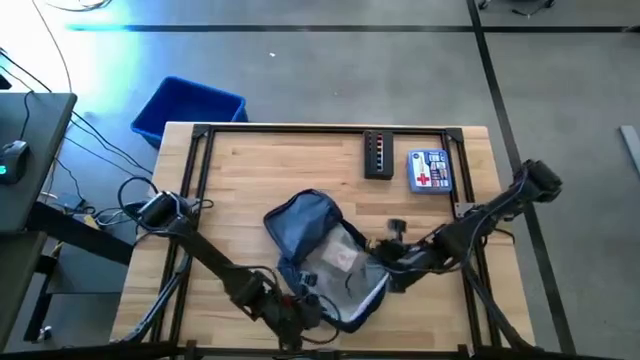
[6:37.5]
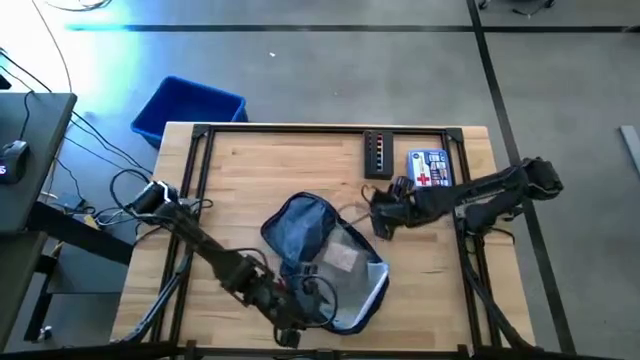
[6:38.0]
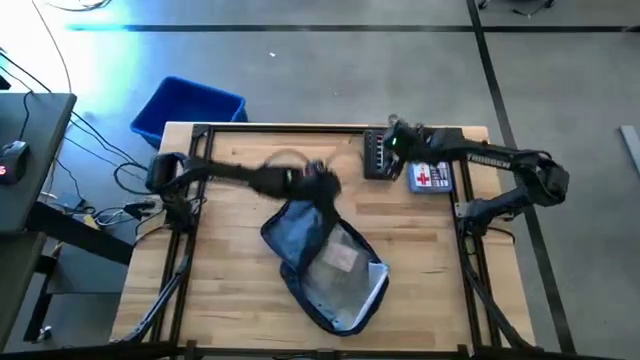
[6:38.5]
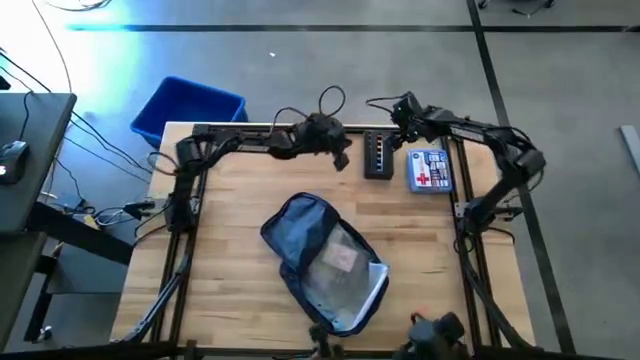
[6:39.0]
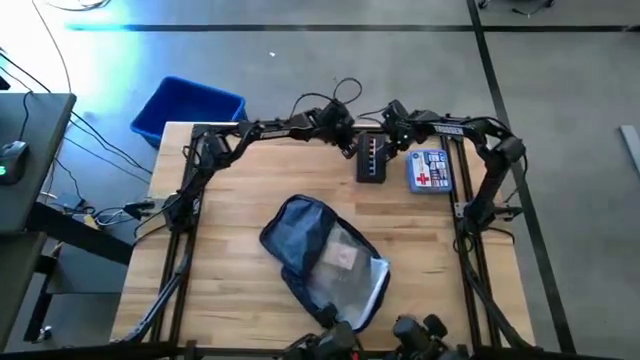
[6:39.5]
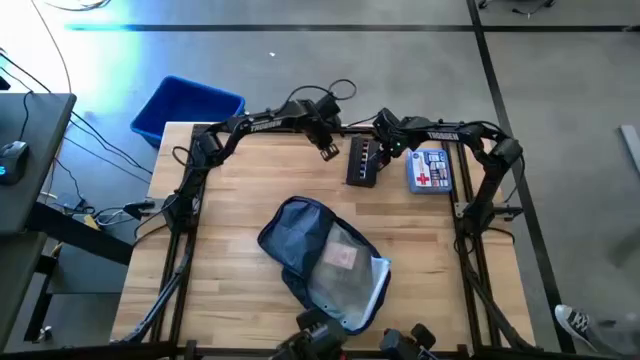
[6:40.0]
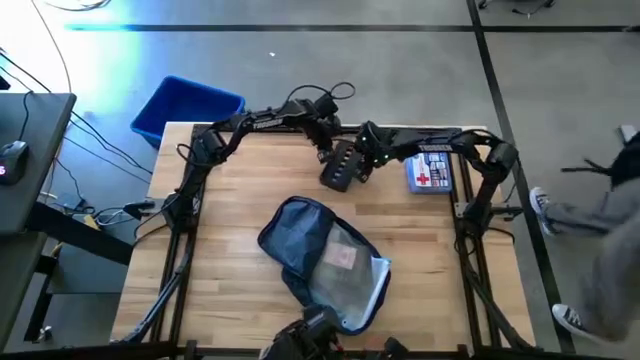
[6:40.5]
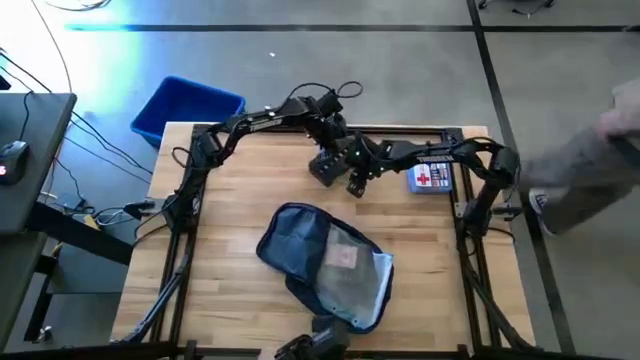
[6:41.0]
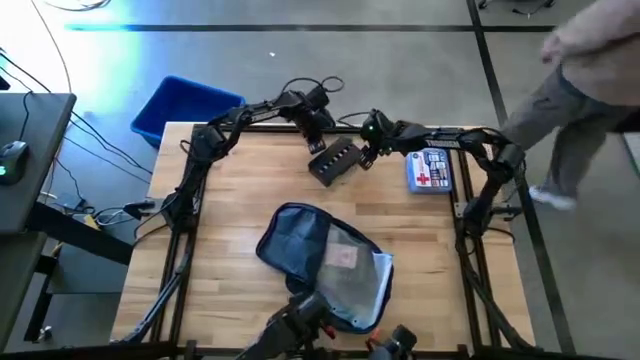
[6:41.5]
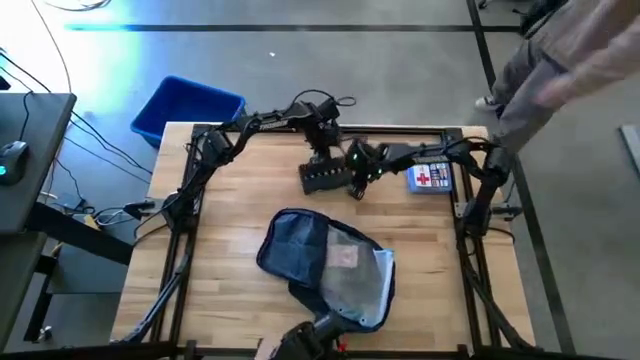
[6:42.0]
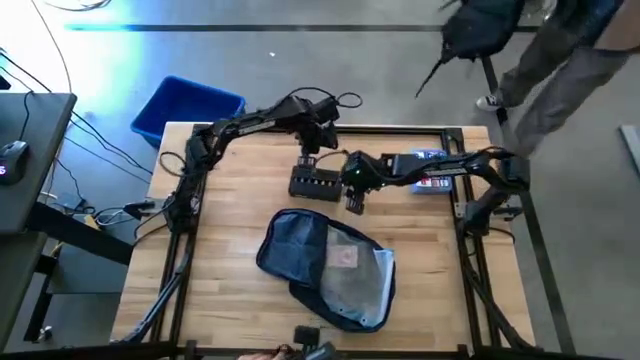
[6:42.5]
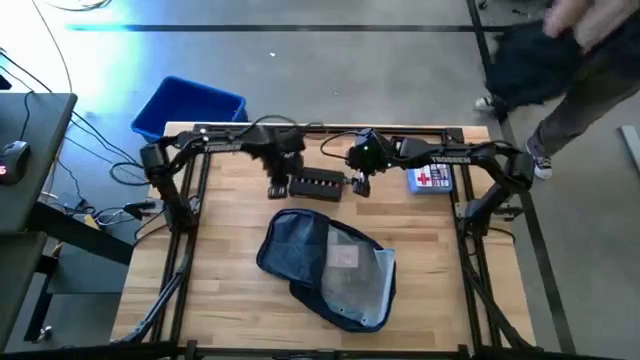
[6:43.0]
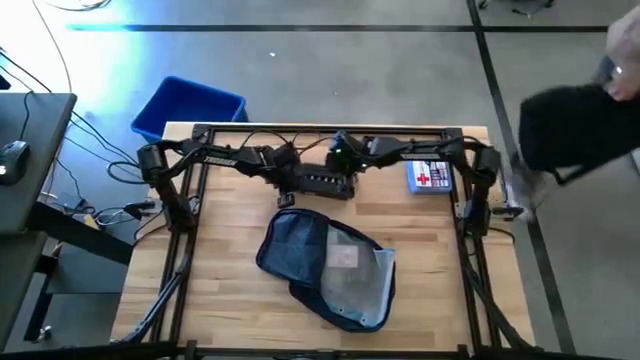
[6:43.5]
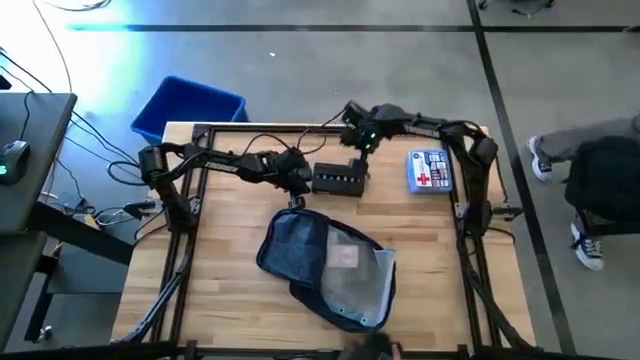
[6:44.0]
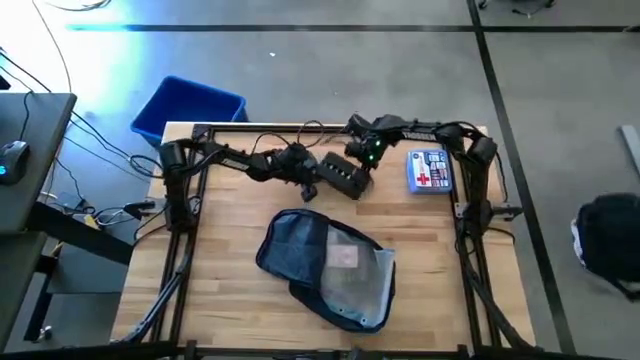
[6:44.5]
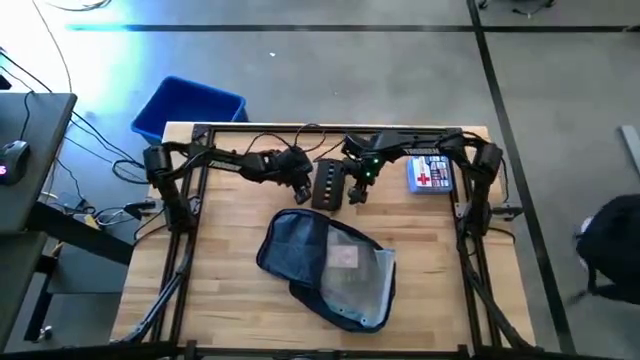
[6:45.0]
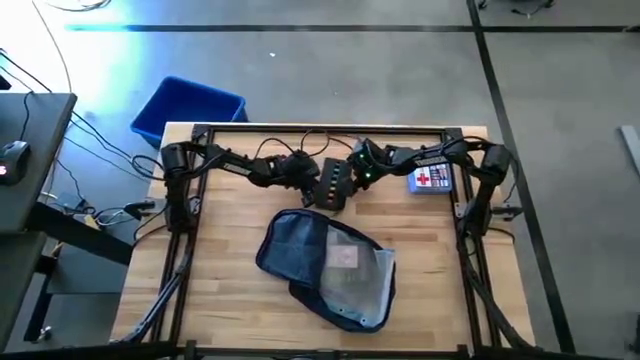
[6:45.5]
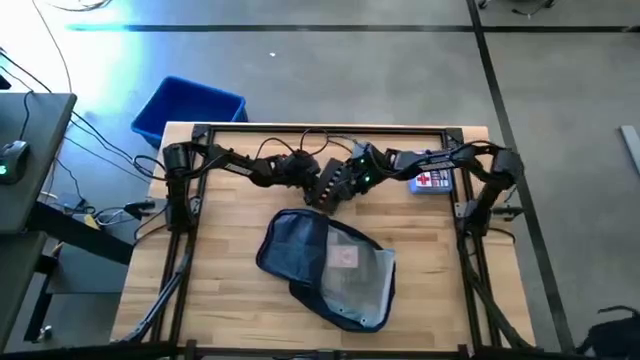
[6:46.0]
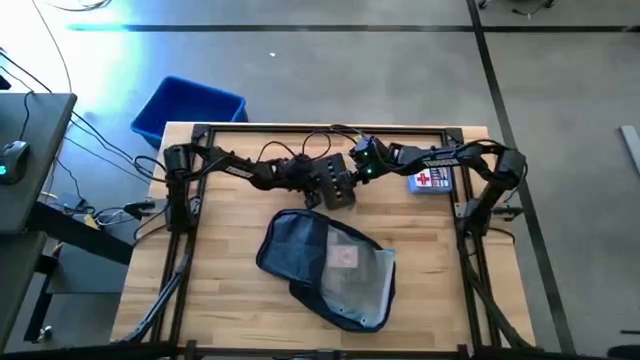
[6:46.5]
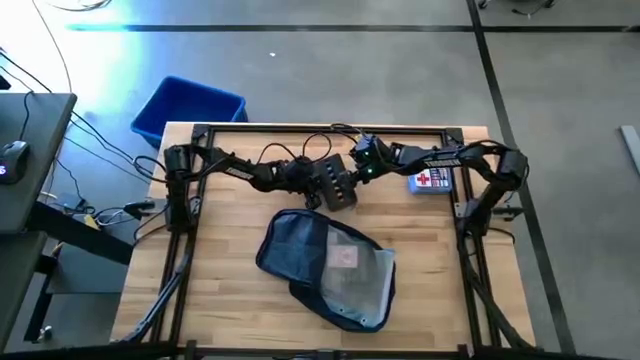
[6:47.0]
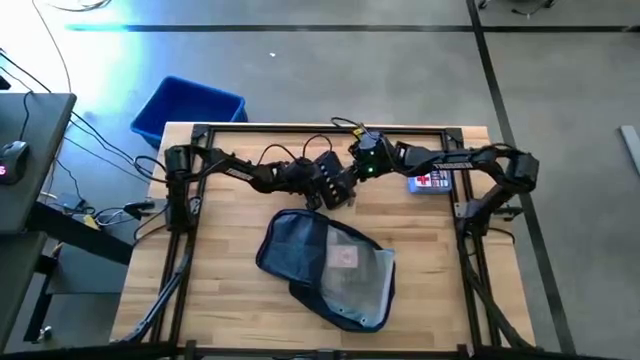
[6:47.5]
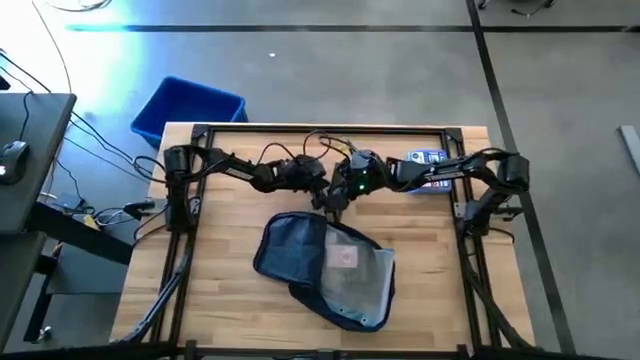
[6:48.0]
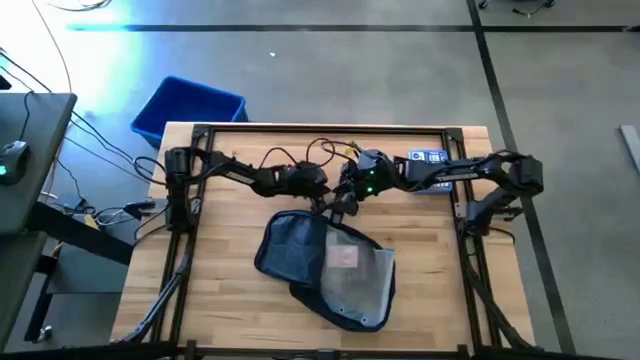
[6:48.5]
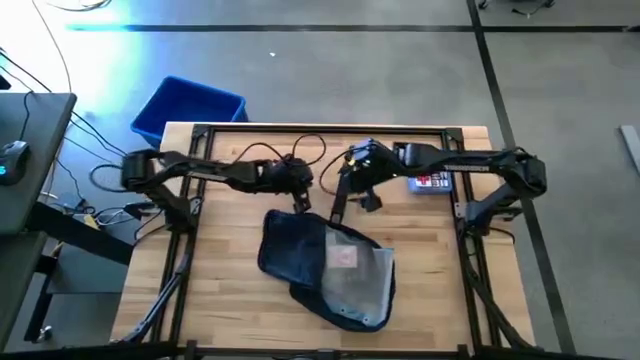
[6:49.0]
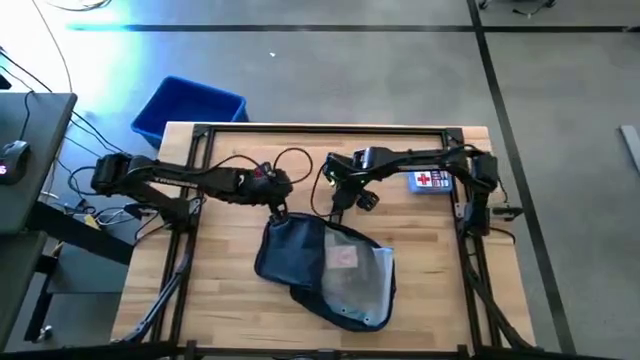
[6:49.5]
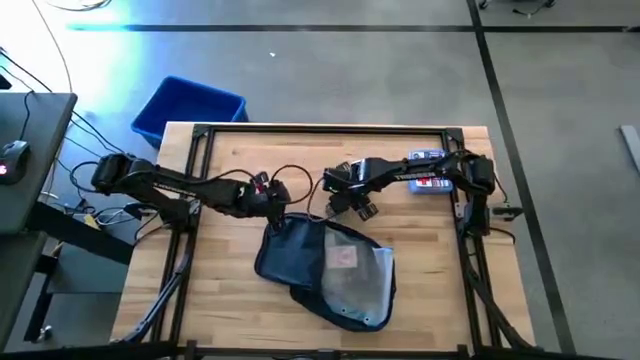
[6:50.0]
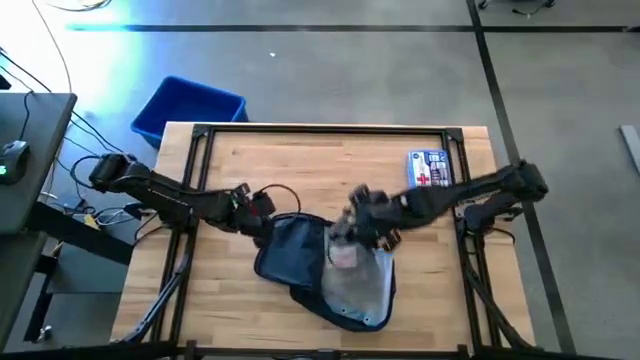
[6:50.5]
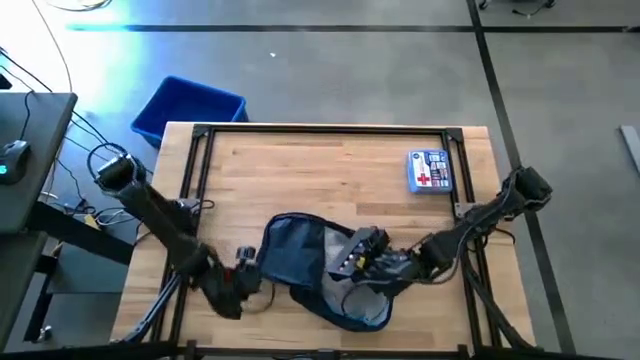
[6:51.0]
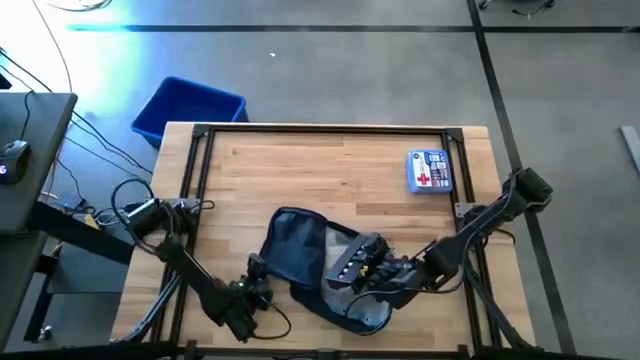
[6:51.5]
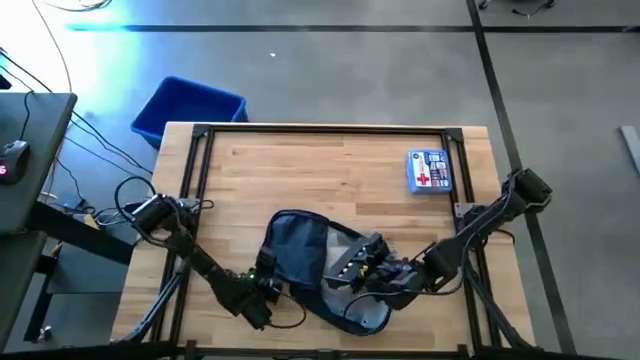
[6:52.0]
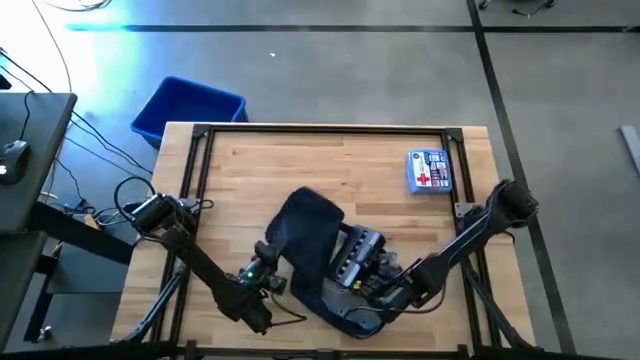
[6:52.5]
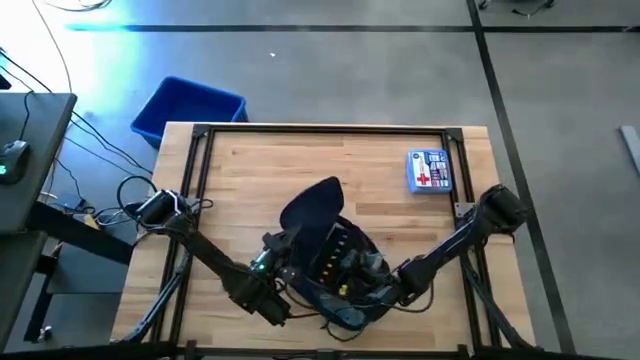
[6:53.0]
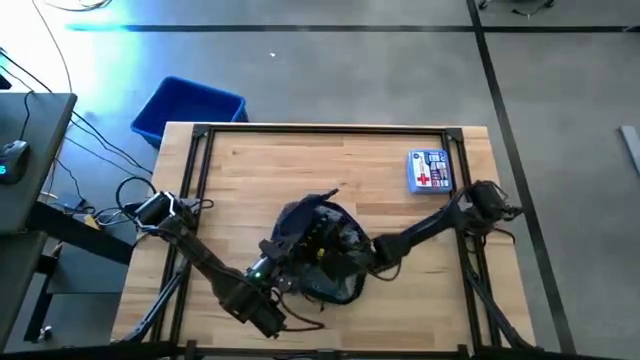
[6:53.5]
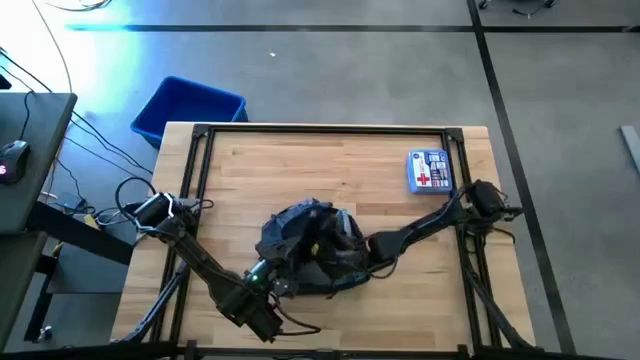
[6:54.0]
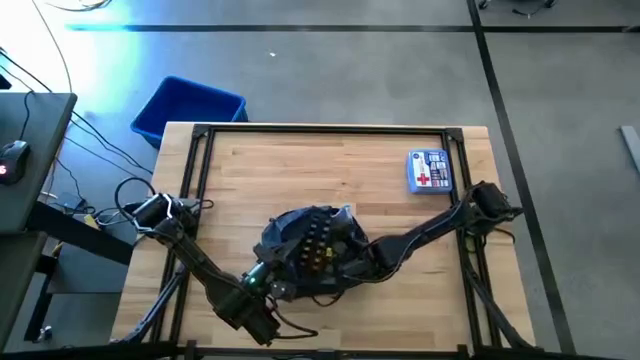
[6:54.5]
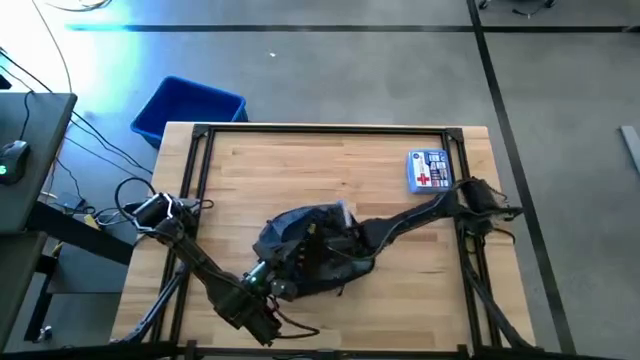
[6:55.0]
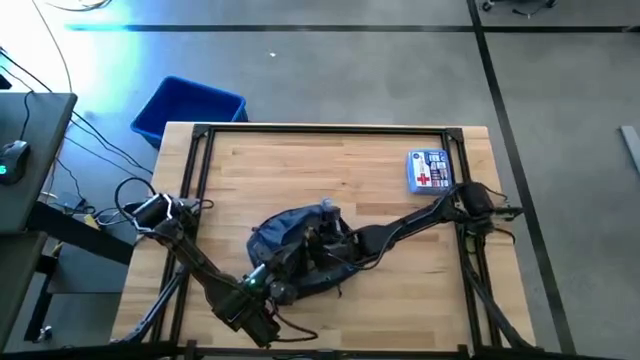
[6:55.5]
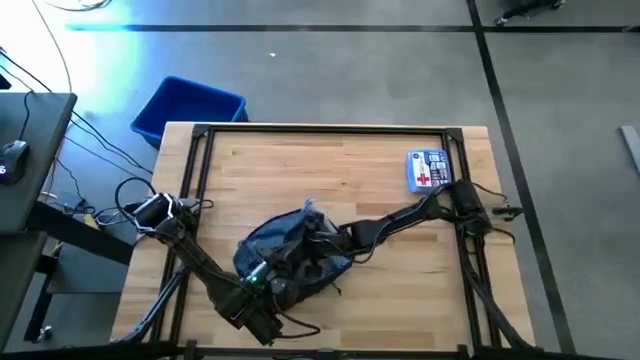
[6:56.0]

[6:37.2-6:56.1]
Task: Unpack backpack
Put the black pill organizer into the backpack

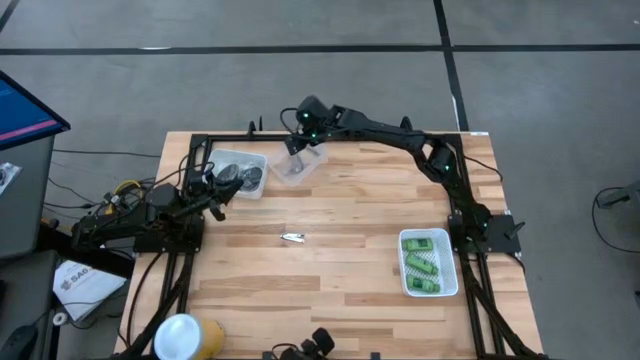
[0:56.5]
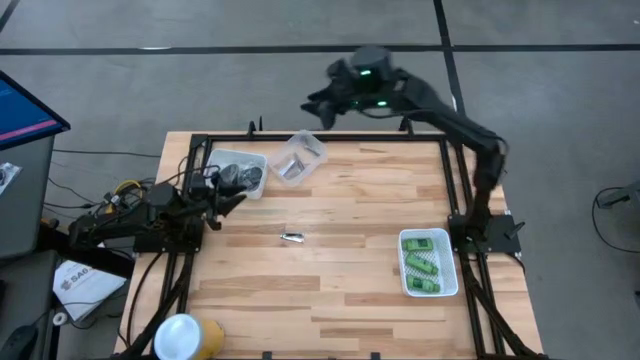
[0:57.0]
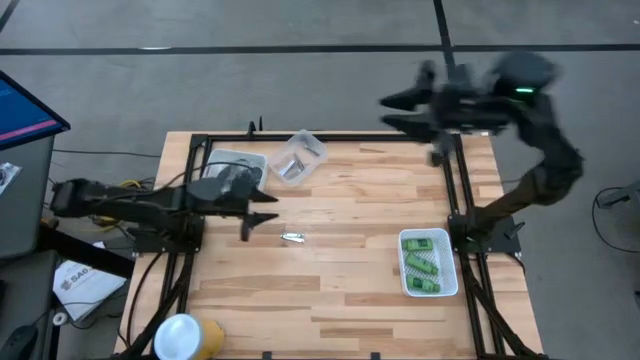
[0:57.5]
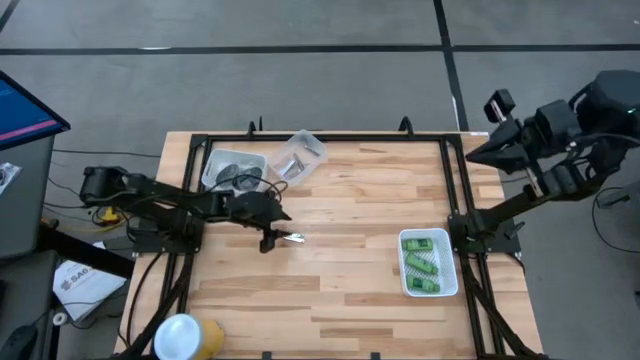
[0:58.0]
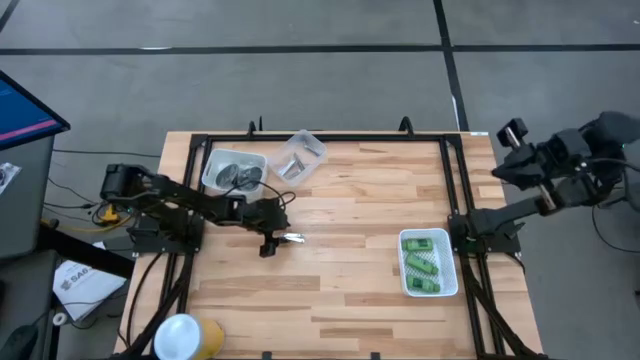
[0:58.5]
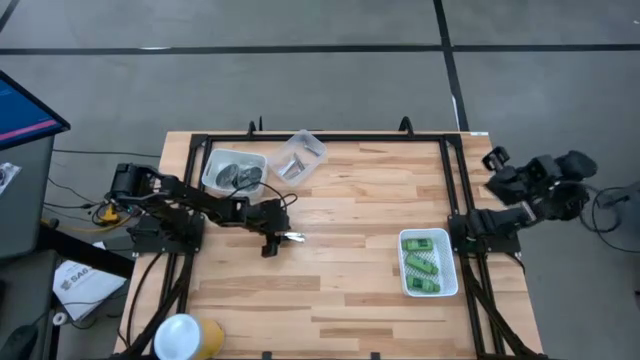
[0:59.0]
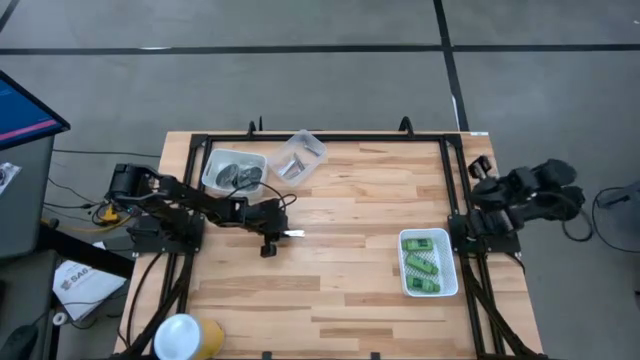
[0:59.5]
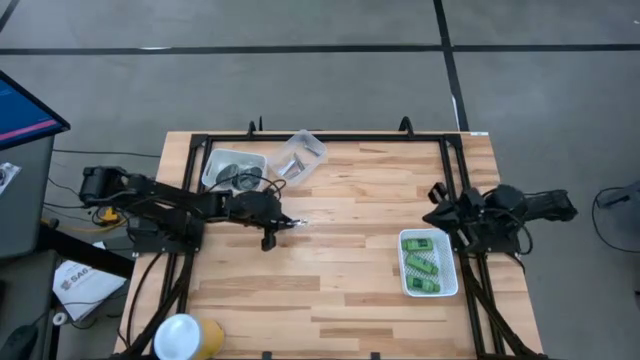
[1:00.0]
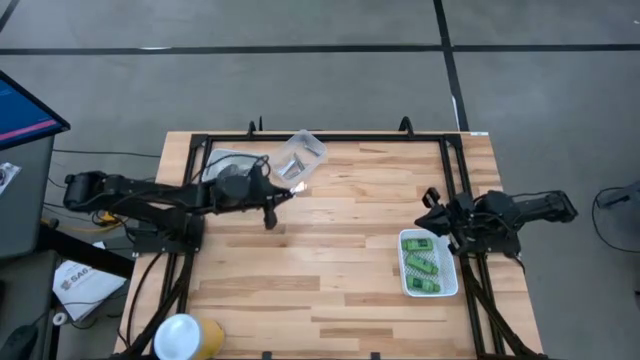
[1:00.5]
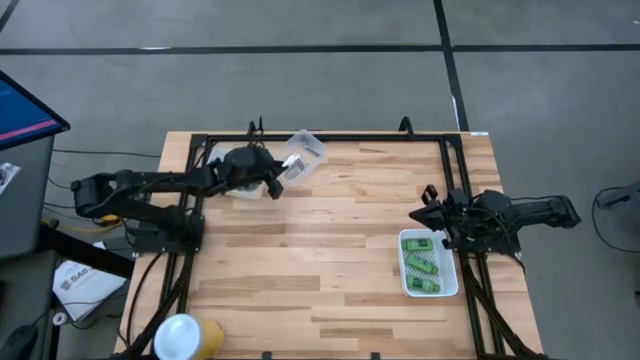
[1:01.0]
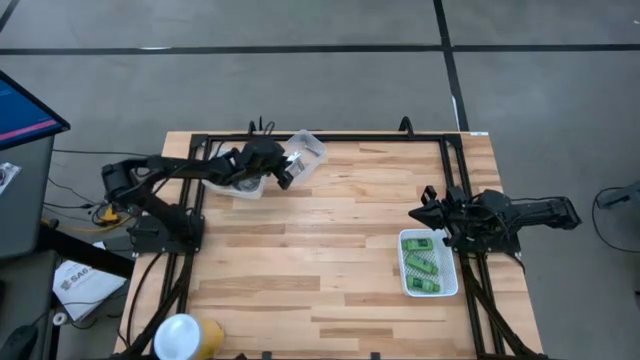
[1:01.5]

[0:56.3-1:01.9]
Task: Pick & Place Travel size toiletries
Put the silver nail cutter into the transparent bin
